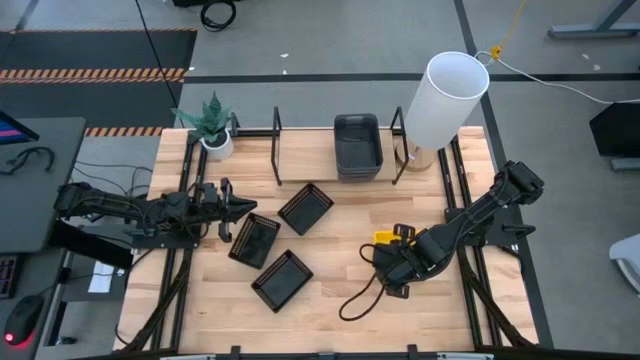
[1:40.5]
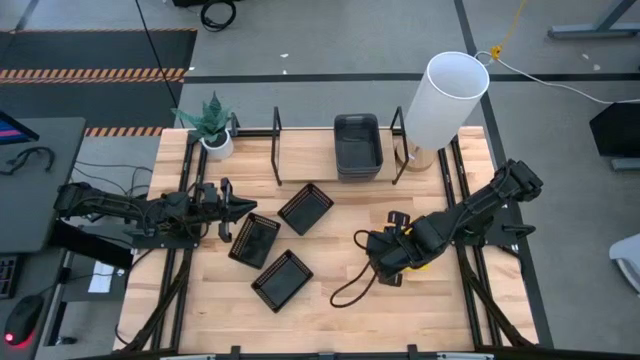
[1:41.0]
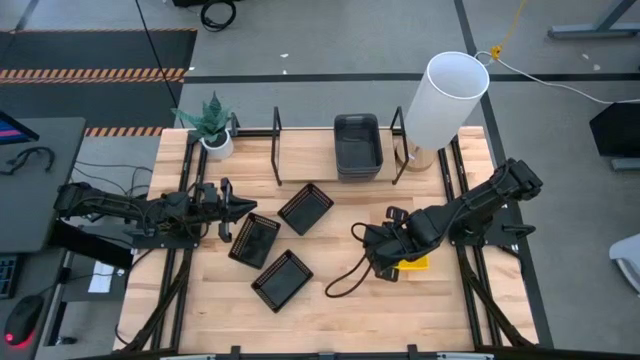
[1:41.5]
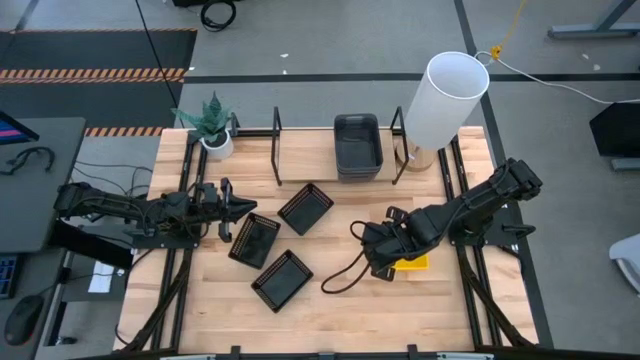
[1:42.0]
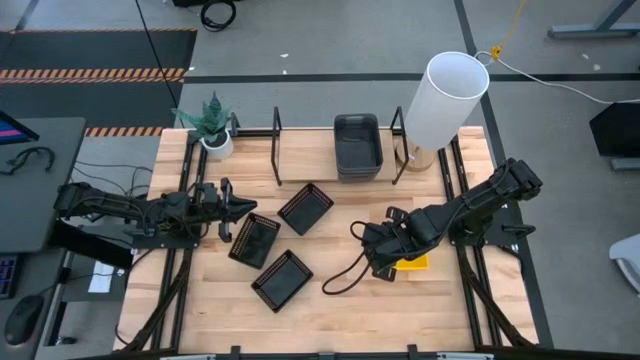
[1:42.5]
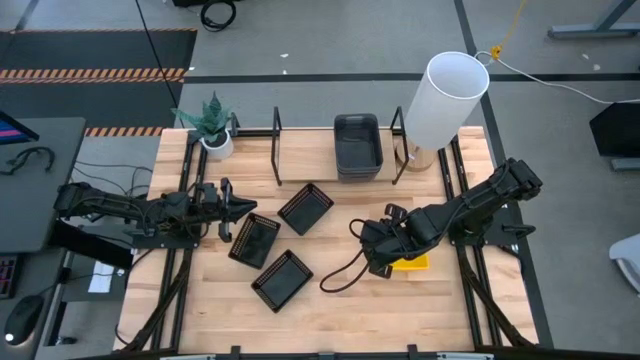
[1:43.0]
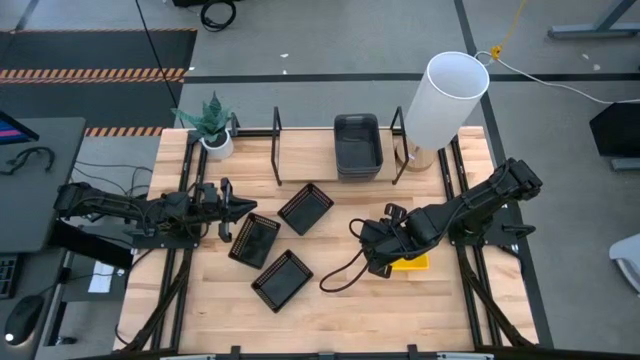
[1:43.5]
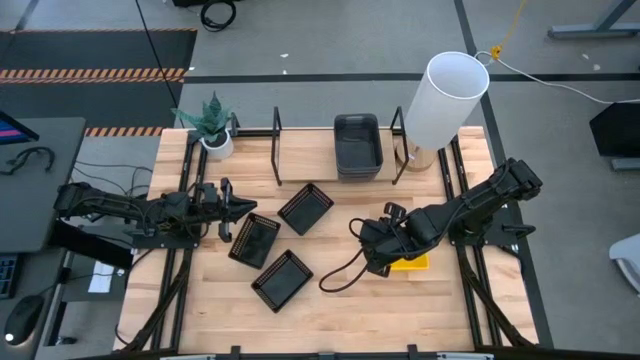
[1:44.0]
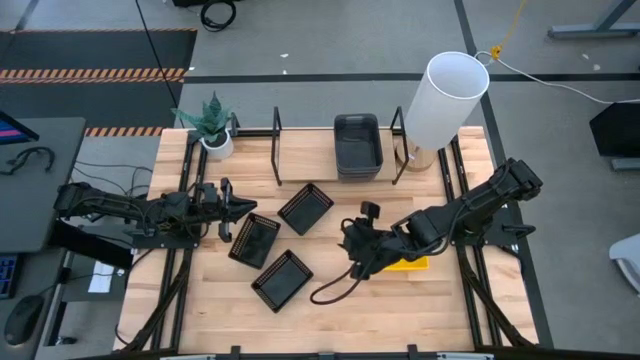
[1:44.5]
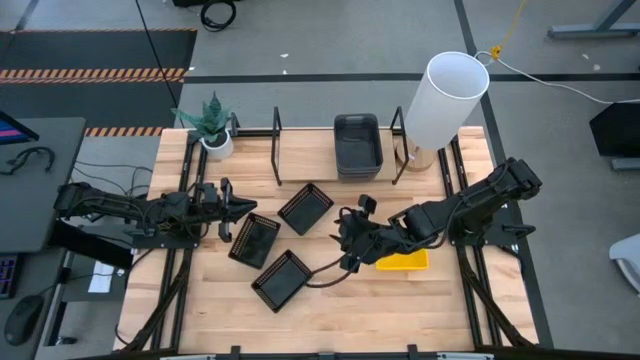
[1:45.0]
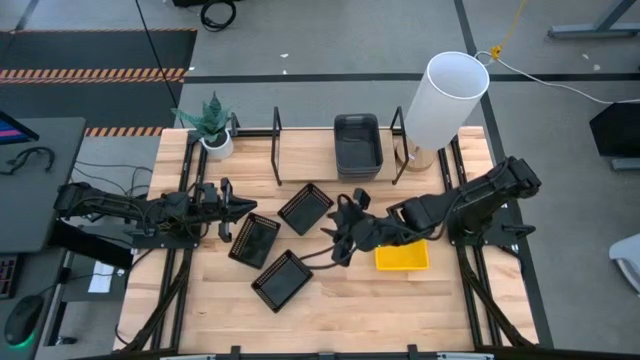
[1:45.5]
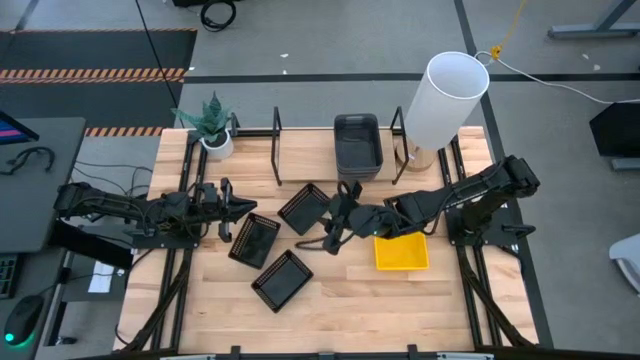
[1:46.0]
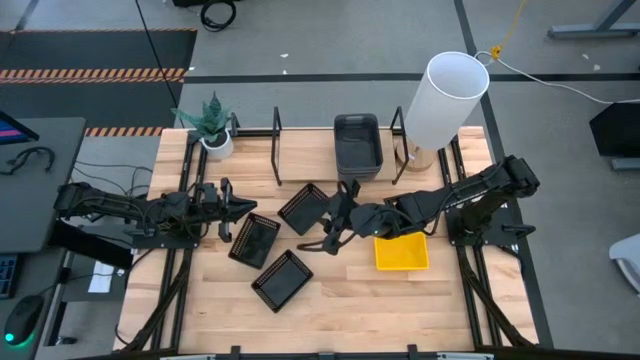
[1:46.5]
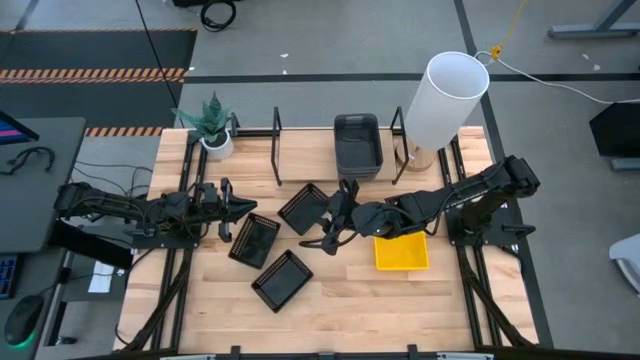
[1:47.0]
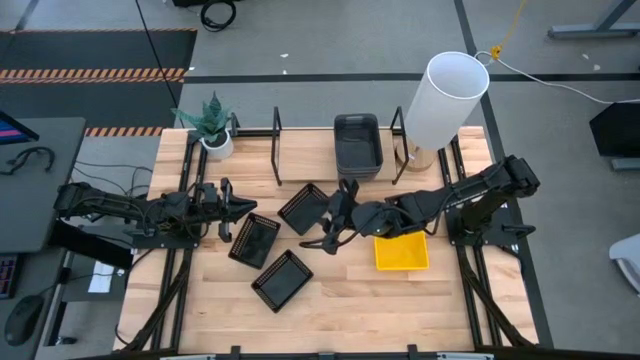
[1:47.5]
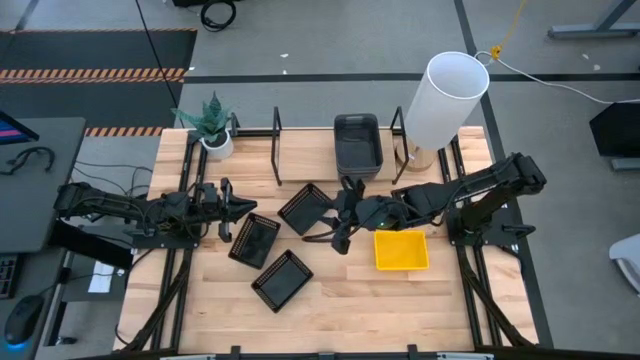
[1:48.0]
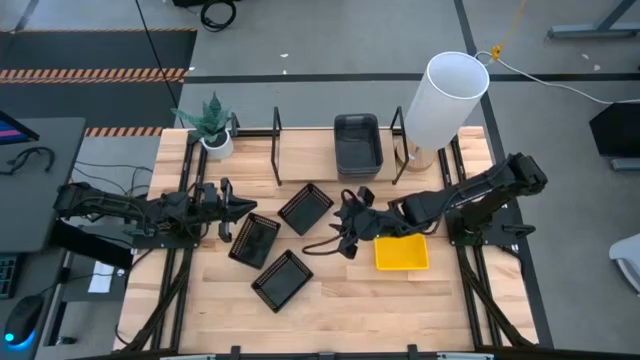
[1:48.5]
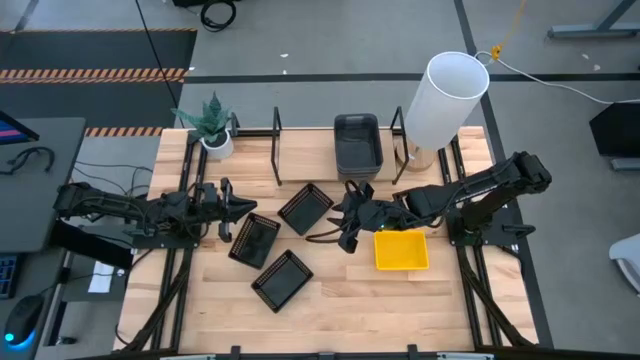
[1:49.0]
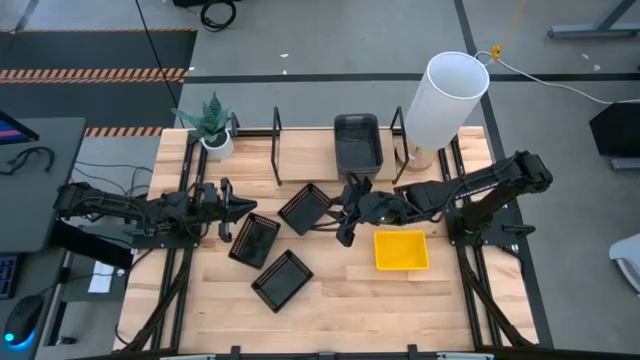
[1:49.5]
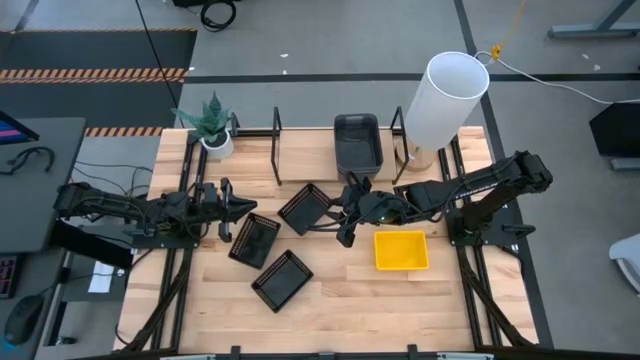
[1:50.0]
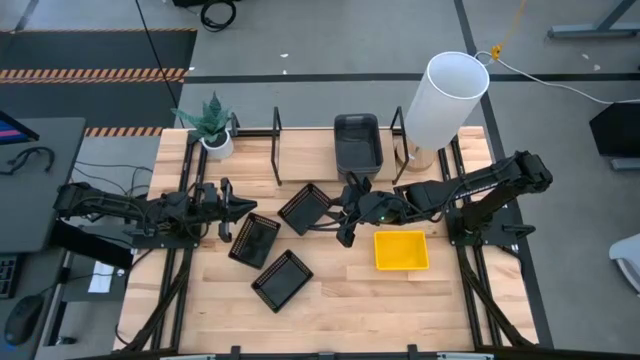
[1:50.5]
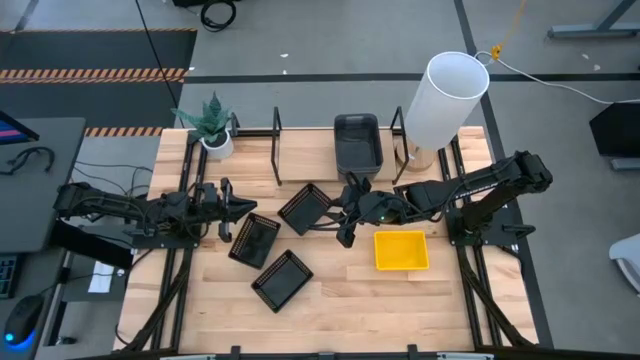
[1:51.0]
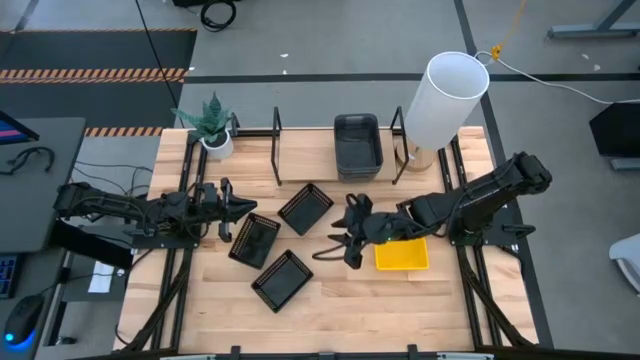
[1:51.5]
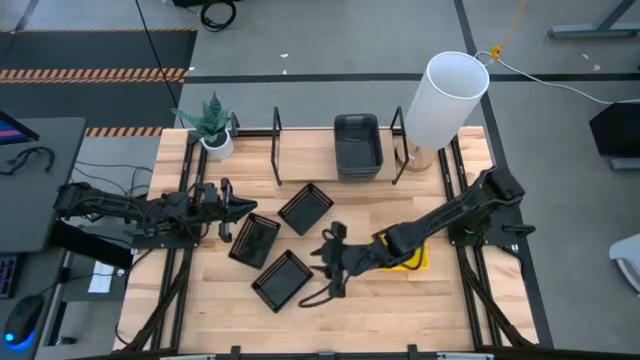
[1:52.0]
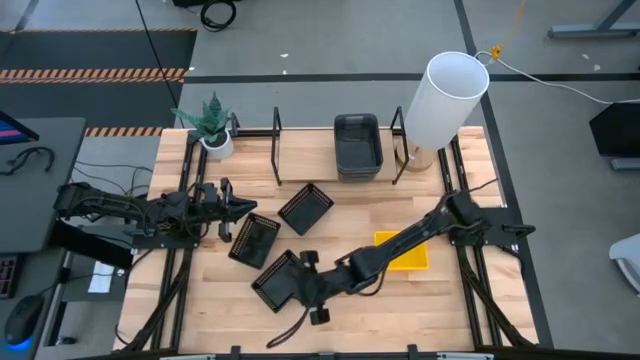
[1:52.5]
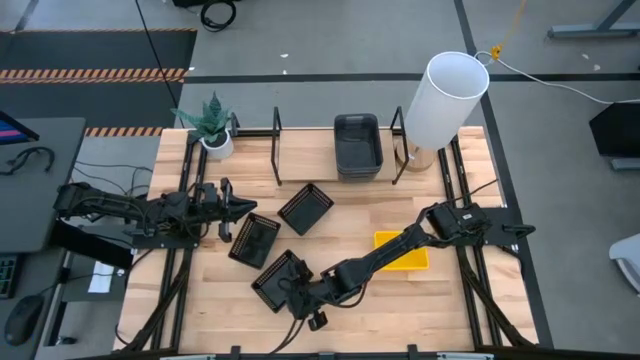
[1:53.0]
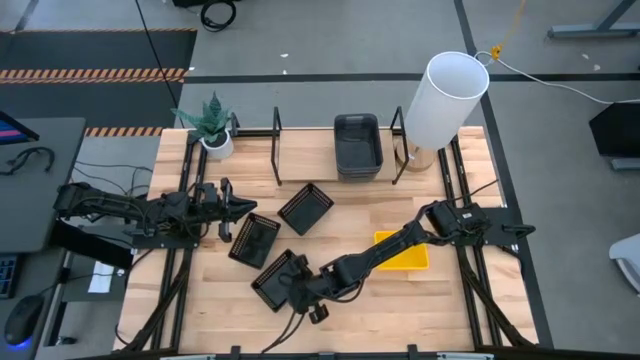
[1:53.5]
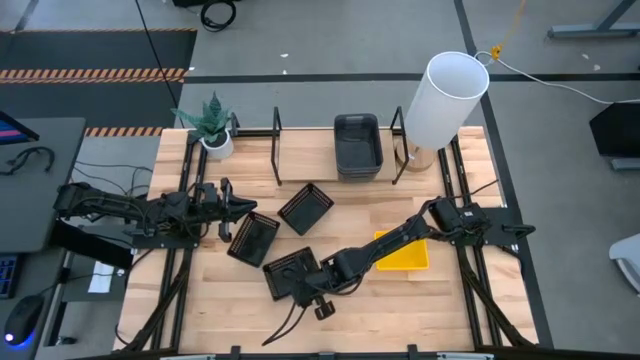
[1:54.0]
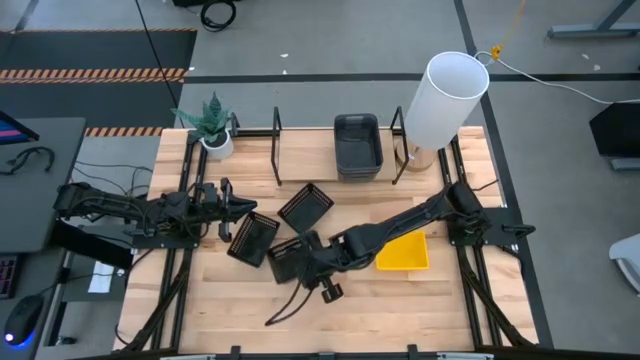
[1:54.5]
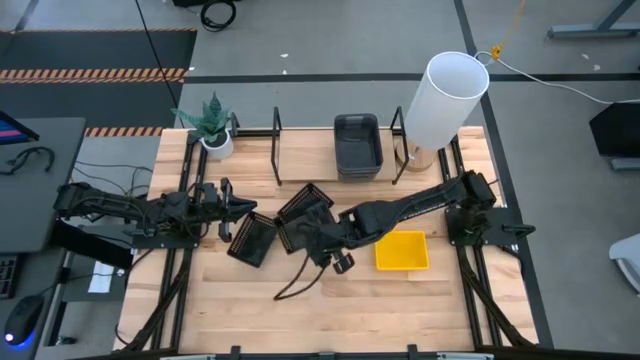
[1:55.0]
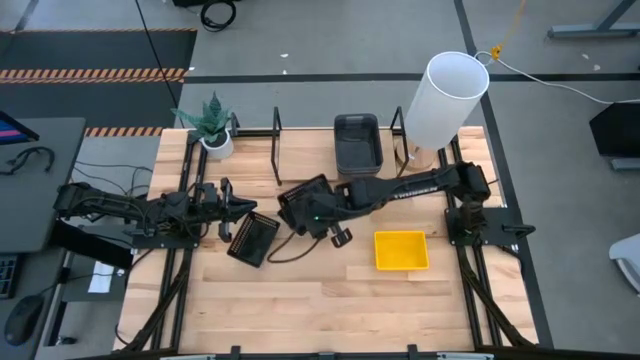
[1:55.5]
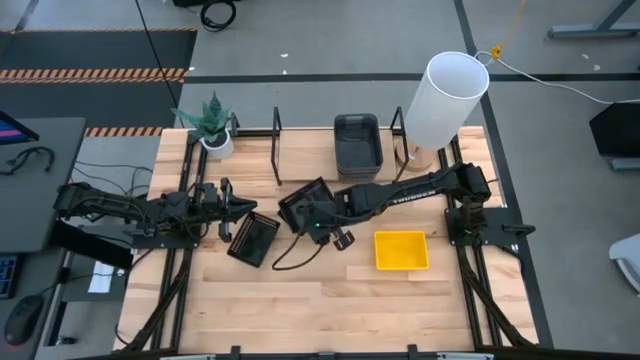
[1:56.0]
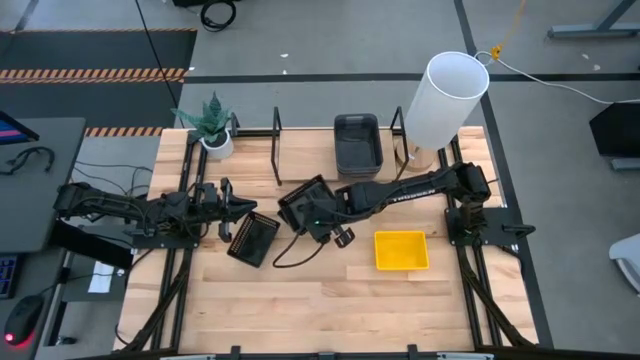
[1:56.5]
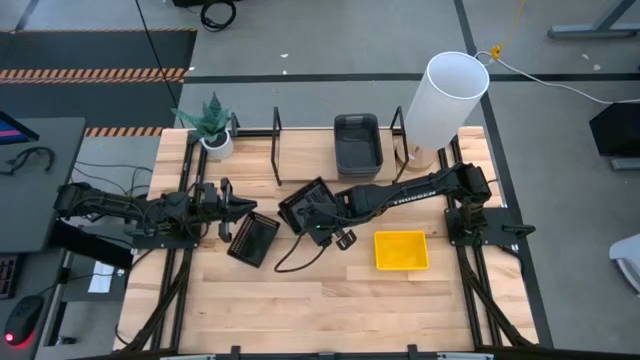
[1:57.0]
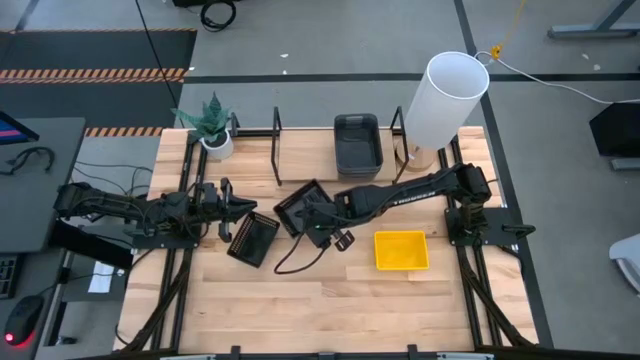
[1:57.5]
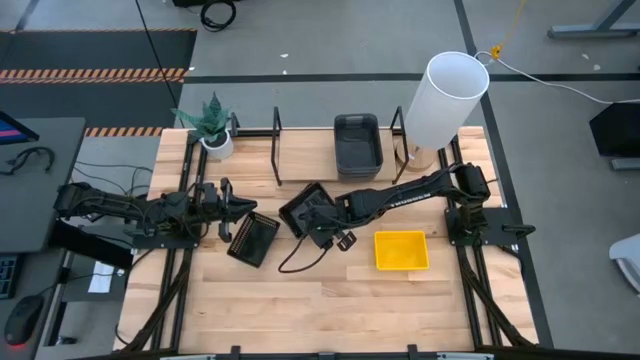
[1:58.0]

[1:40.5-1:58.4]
Task: Stack baskets on shelf by color
Stack the bottom right black bin on the top right black bin
